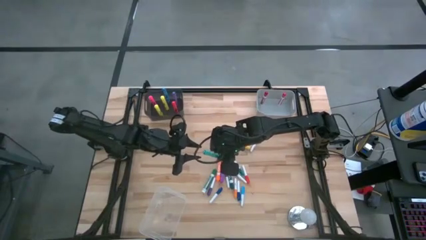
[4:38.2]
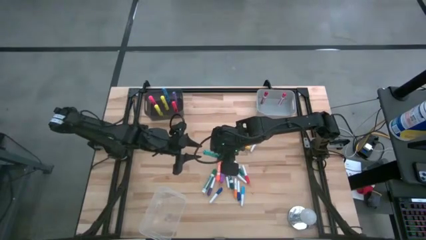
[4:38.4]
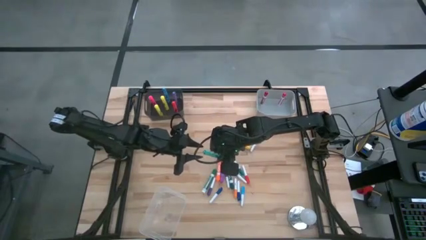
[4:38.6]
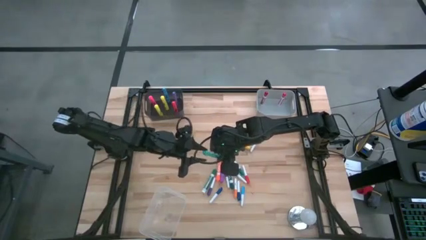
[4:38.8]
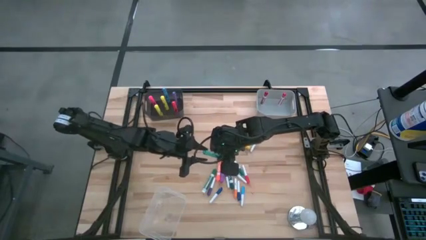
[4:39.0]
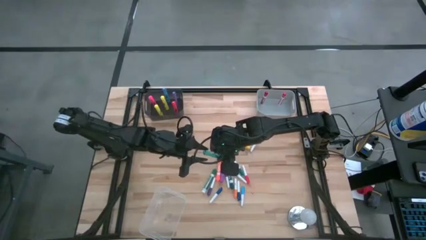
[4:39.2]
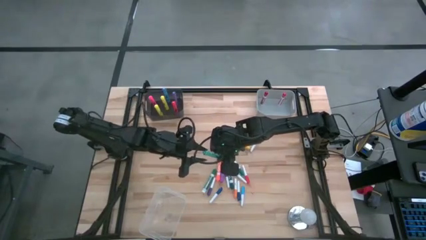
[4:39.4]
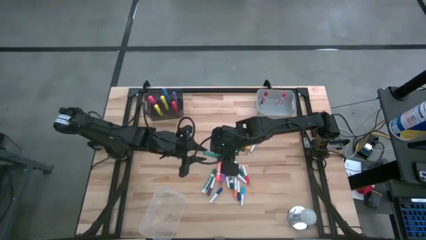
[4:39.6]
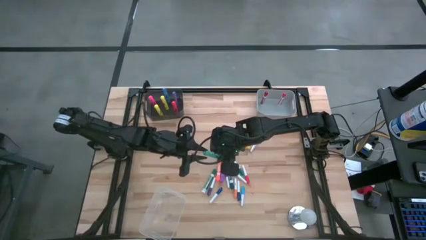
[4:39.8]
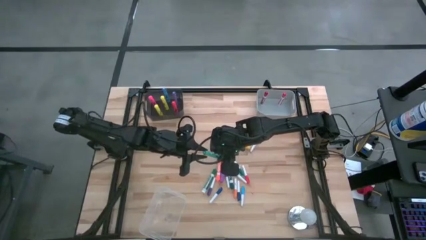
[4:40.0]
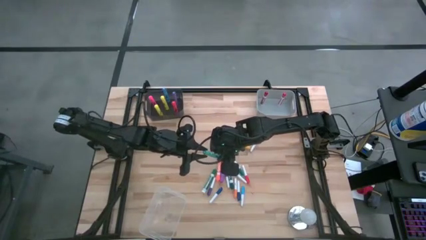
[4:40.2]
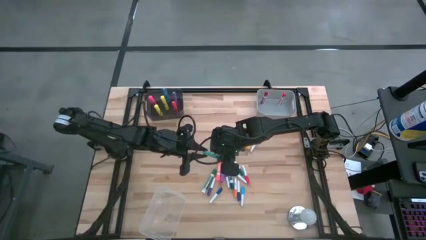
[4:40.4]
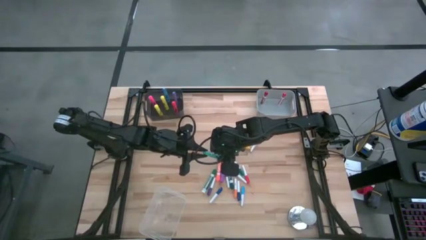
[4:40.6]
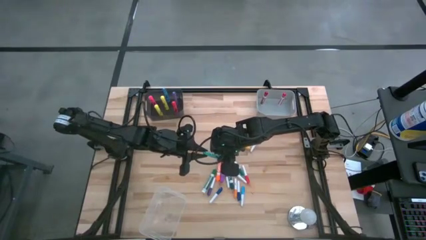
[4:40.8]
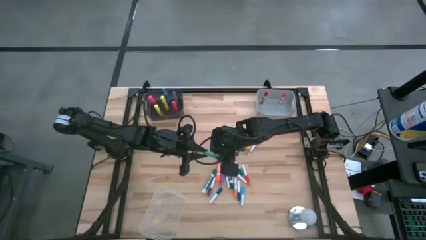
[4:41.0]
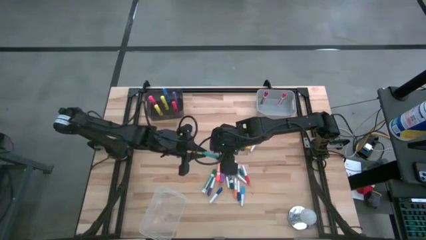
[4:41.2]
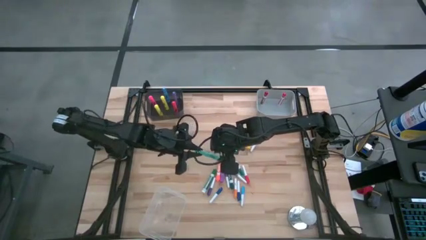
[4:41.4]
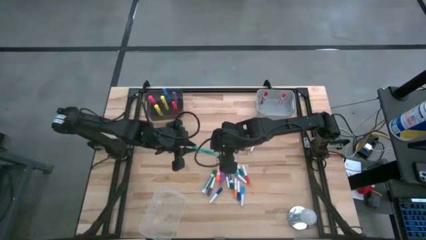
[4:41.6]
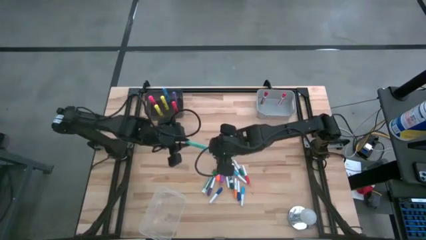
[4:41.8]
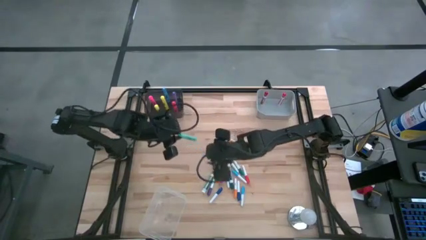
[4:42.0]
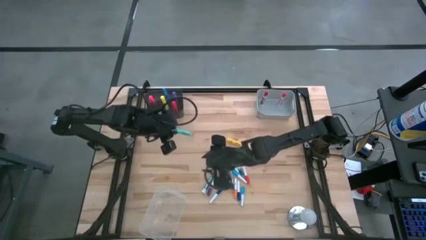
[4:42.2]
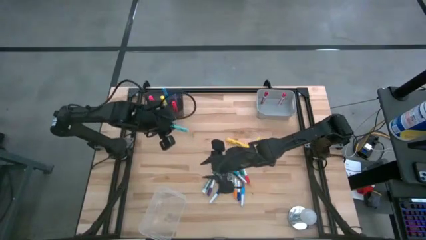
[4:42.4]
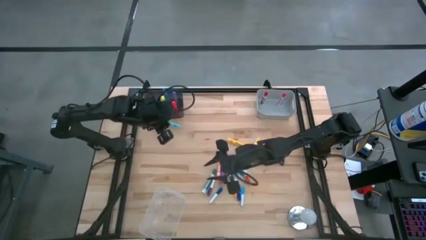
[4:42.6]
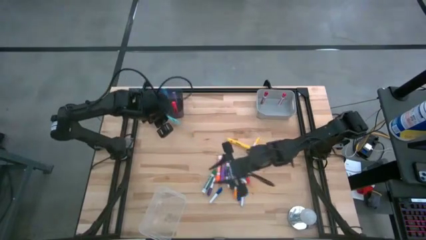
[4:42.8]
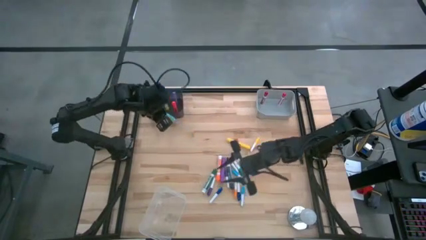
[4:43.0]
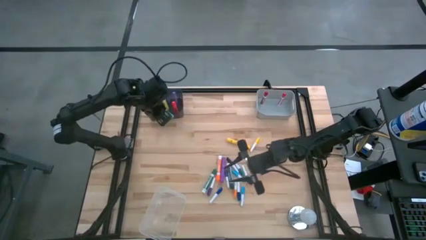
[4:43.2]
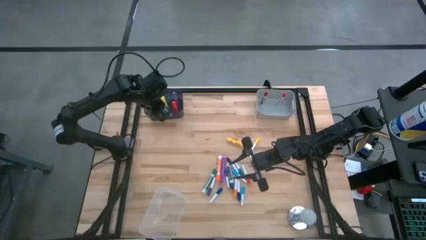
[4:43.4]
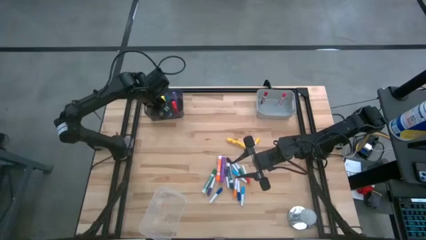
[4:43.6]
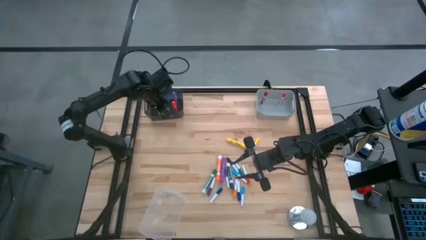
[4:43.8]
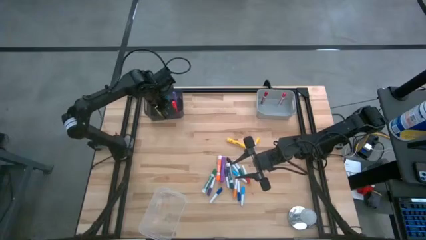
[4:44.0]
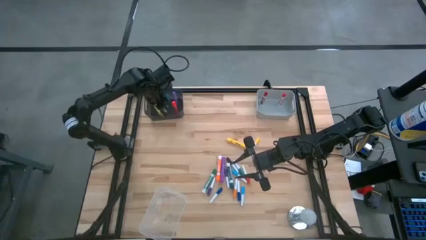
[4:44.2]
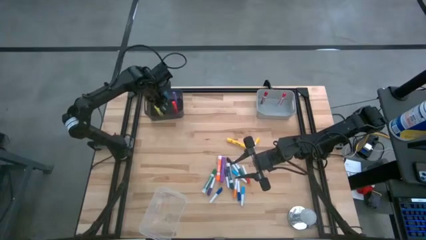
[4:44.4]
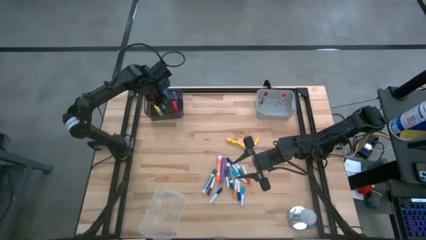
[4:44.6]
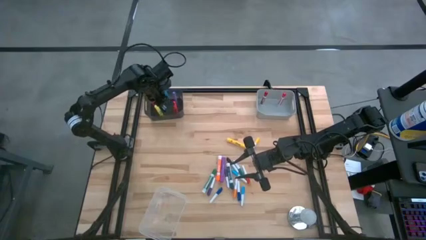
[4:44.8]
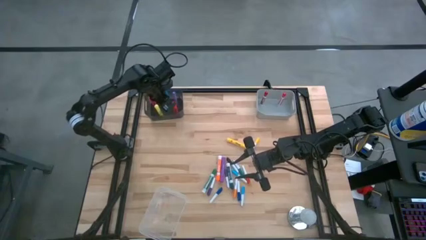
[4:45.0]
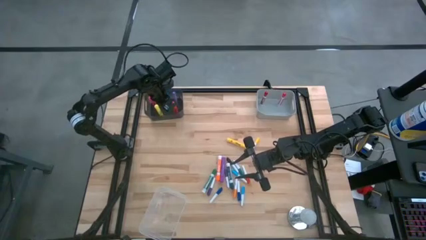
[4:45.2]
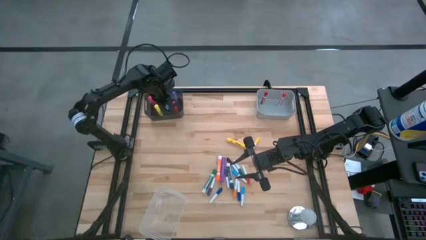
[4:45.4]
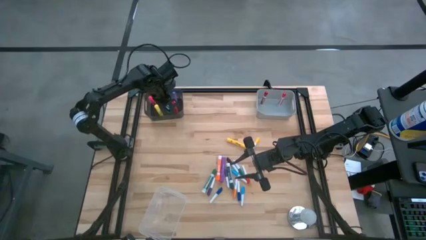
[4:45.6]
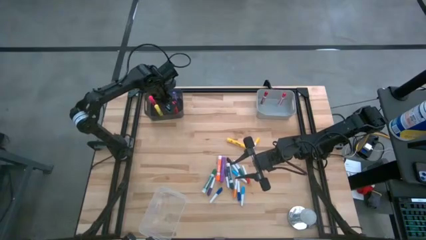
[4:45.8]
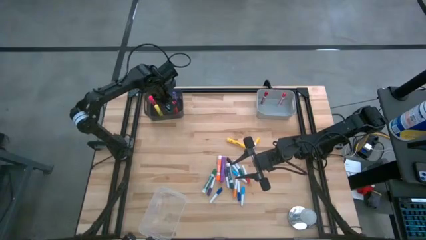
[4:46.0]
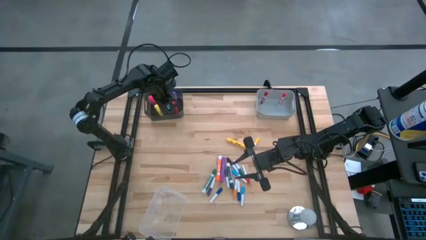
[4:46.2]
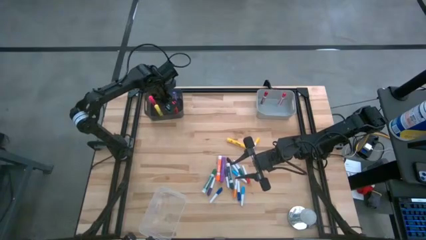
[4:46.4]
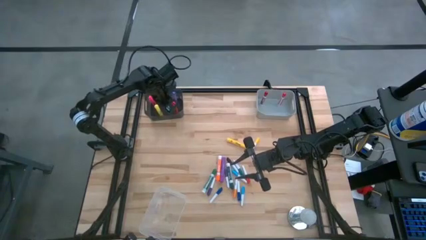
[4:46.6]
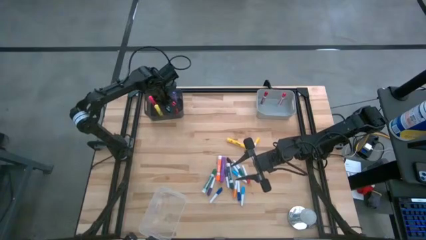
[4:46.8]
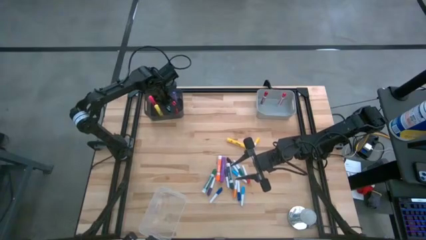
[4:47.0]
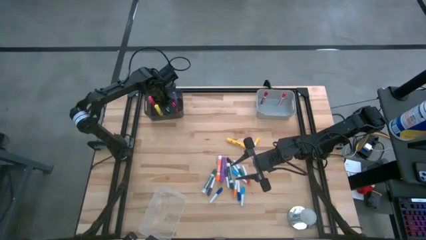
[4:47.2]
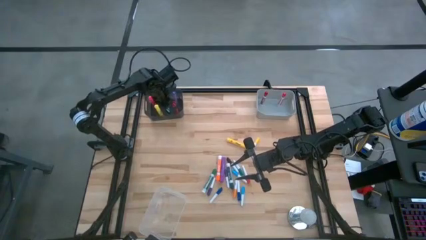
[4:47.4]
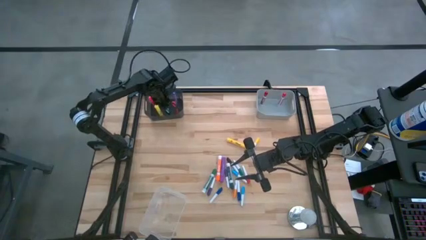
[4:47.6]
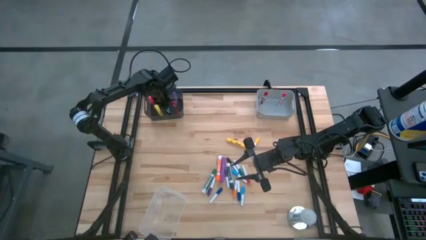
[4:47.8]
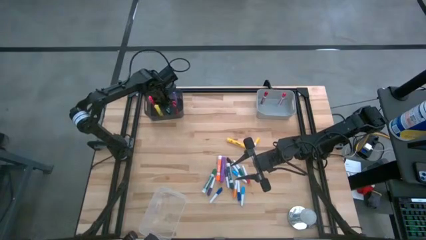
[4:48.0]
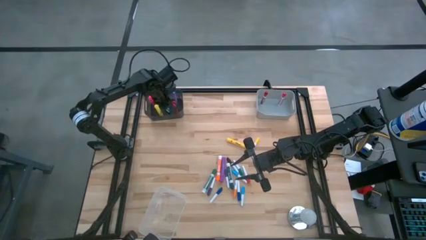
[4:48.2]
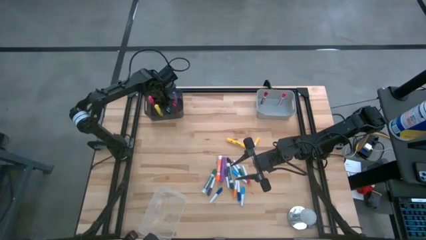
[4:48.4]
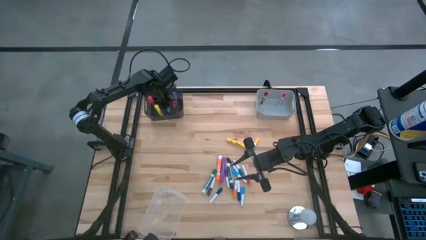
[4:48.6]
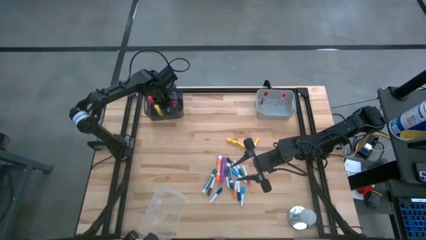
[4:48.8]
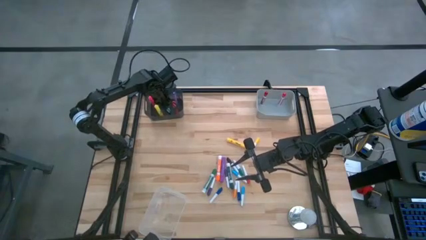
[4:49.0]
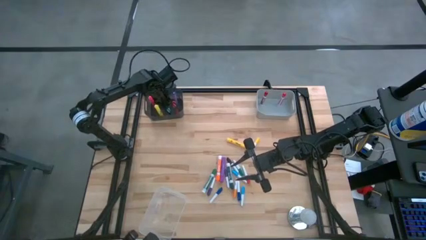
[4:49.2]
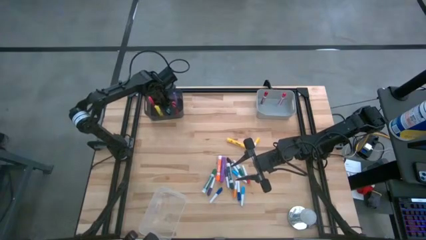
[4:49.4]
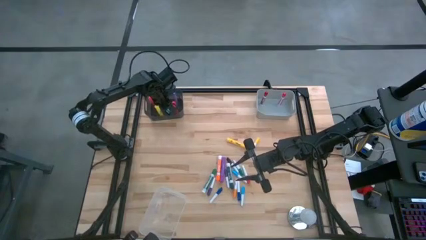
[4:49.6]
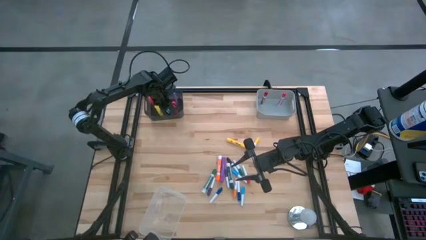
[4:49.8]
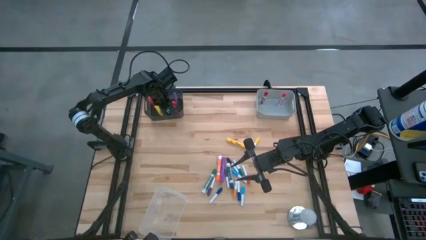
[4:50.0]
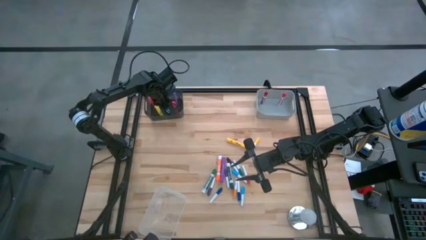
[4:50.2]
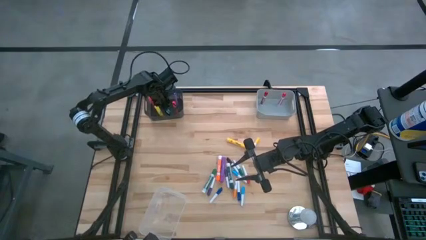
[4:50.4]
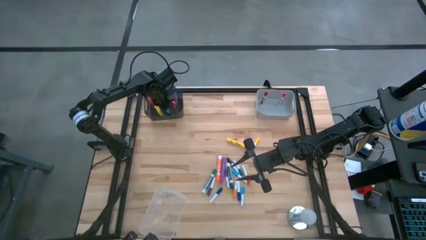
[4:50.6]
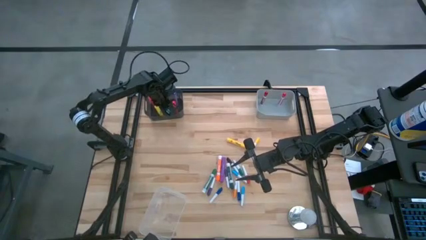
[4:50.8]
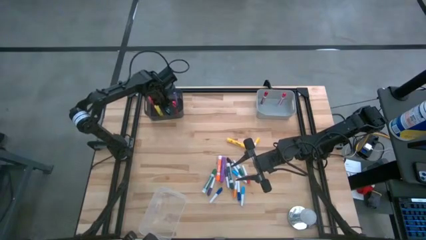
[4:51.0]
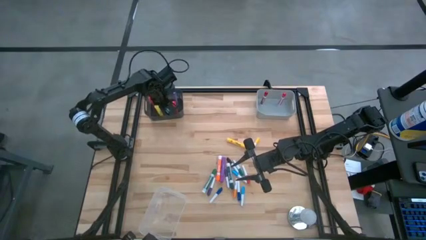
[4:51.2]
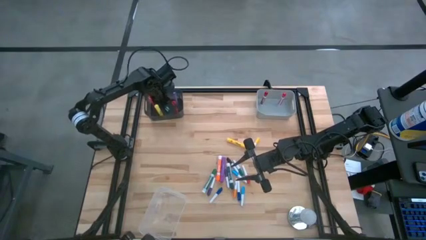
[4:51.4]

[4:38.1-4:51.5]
Task: Pick & Place Markers
Put the light blue highlighter pen into the black bin

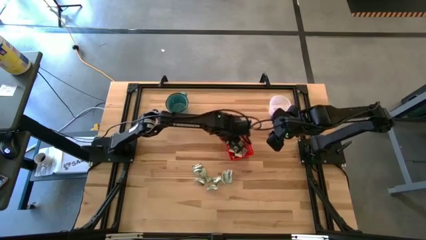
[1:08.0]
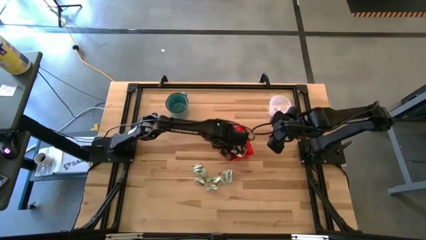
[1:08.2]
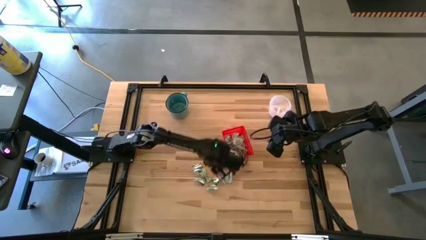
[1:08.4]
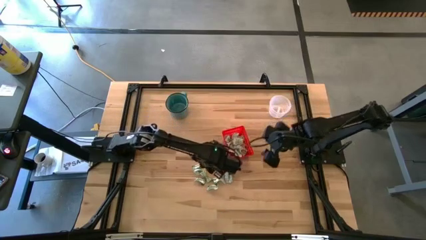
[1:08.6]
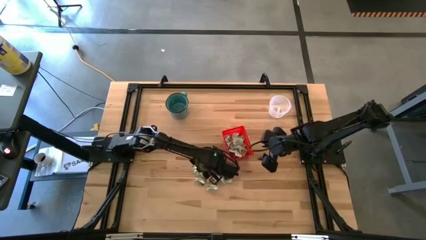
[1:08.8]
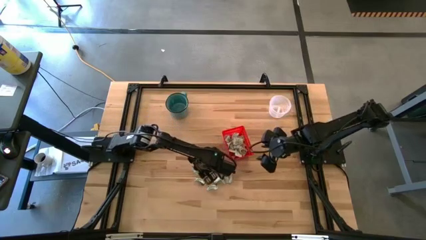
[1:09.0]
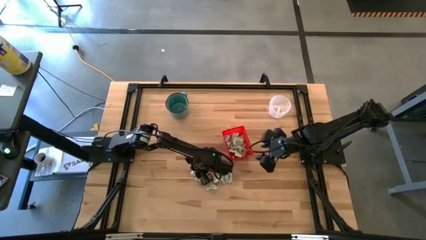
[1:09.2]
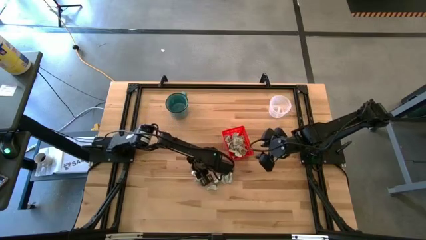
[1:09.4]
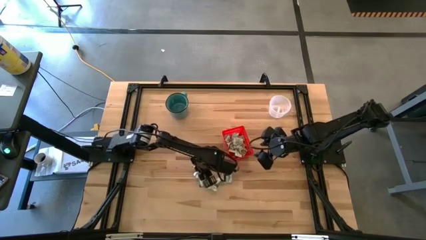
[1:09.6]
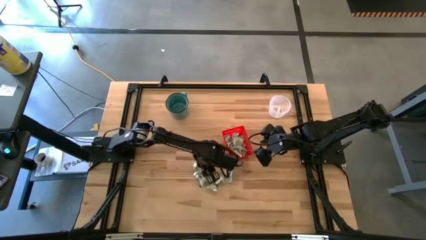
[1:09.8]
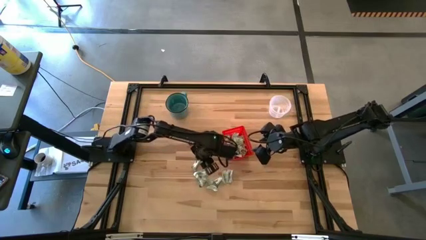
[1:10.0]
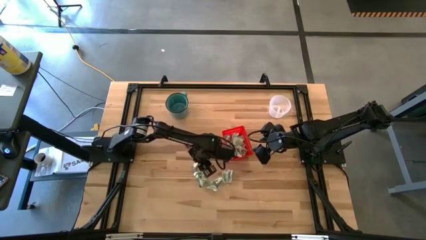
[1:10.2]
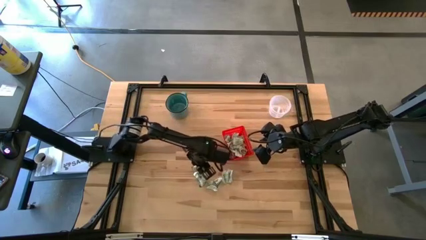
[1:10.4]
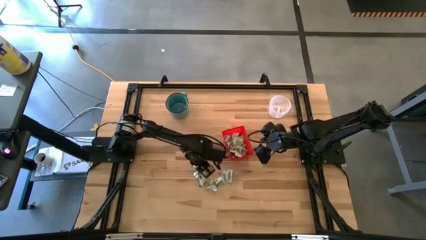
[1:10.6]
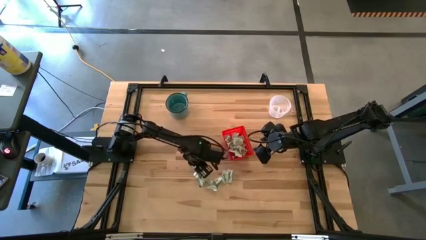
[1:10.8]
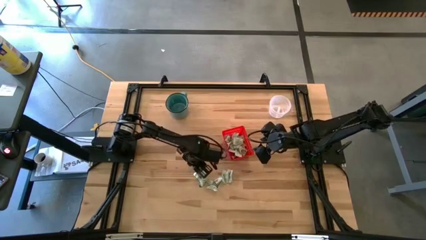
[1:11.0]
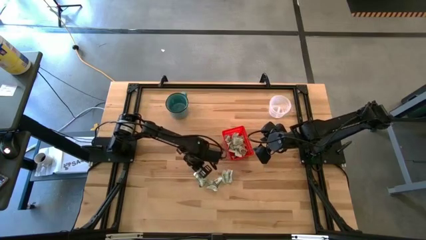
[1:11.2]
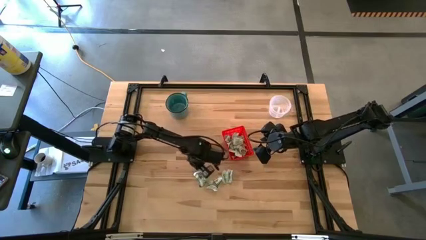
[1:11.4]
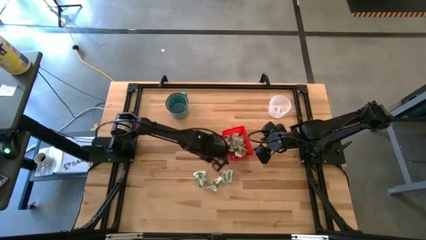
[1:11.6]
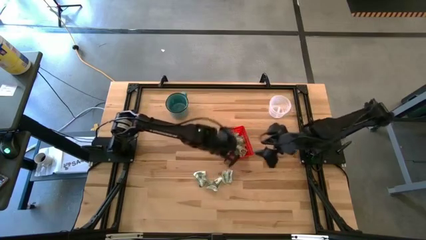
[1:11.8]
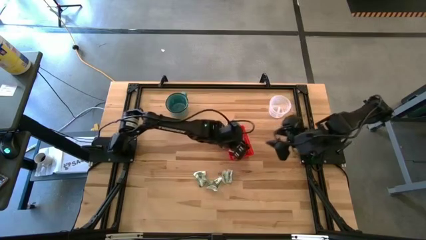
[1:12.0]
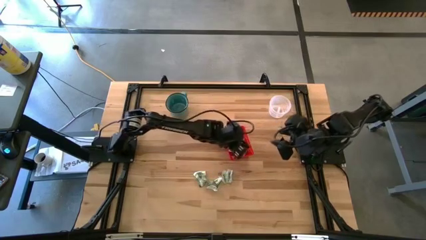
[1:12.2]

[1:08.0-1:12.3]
Task: Pick and place items into bin
Put the truvia packet into the orange bin
